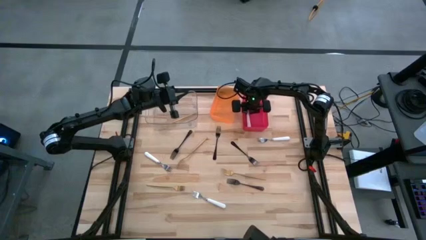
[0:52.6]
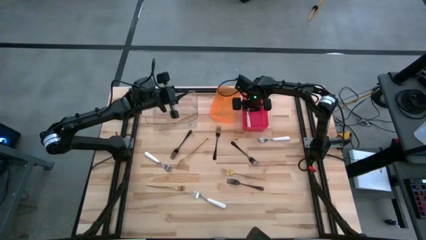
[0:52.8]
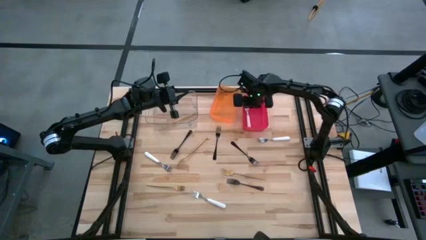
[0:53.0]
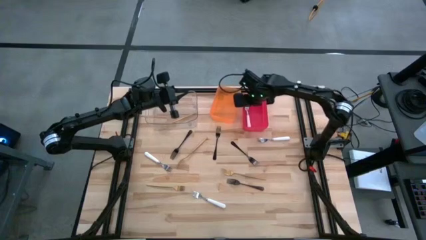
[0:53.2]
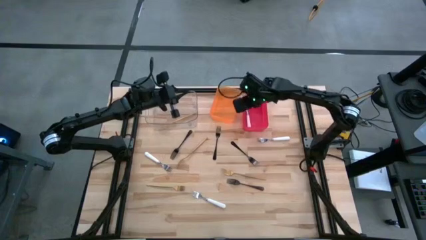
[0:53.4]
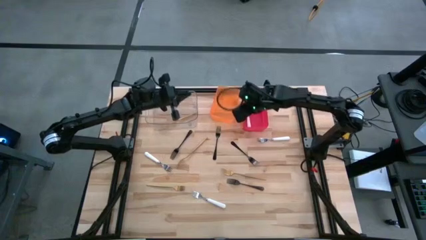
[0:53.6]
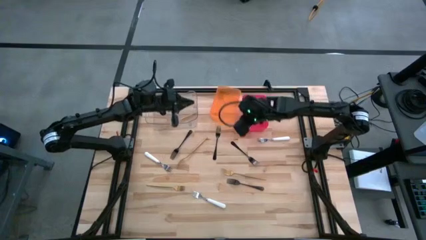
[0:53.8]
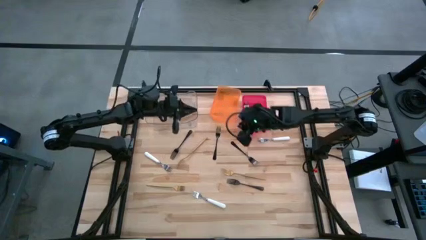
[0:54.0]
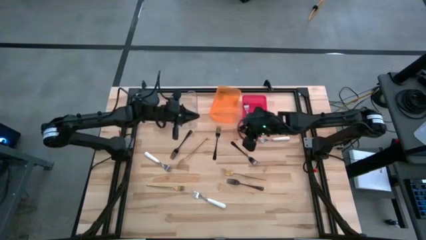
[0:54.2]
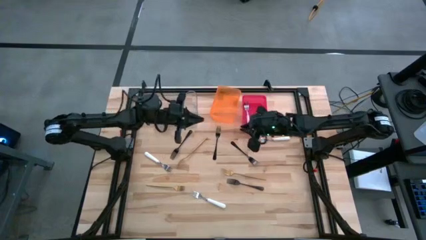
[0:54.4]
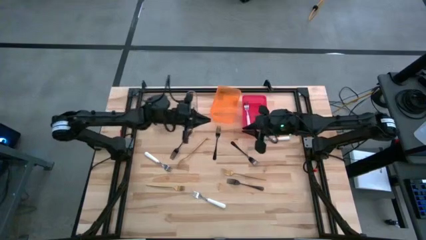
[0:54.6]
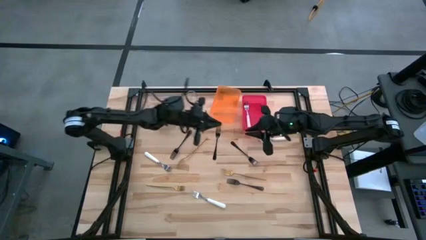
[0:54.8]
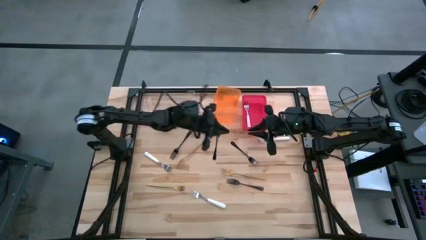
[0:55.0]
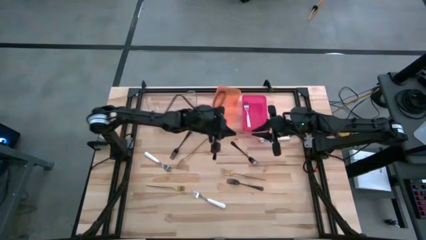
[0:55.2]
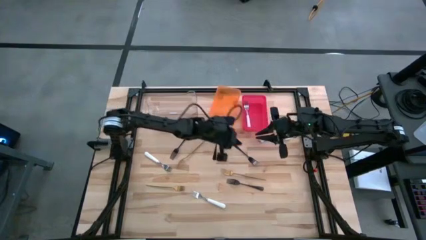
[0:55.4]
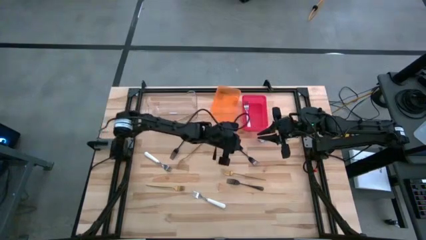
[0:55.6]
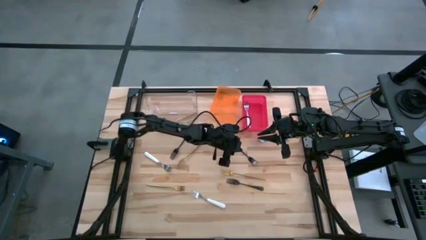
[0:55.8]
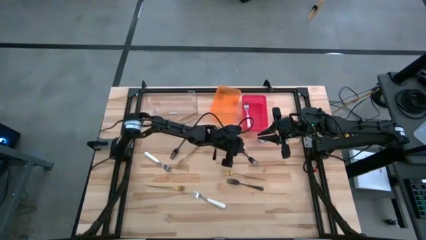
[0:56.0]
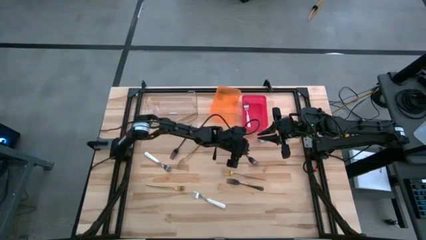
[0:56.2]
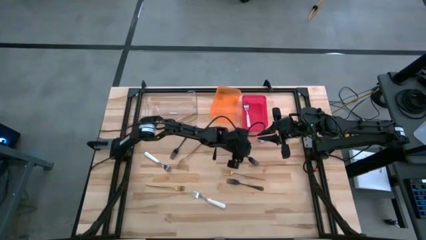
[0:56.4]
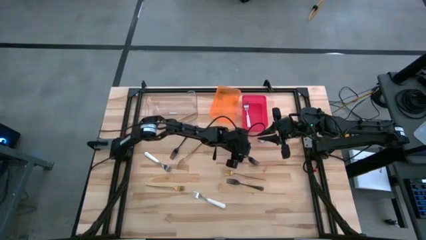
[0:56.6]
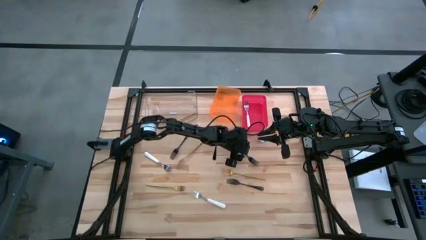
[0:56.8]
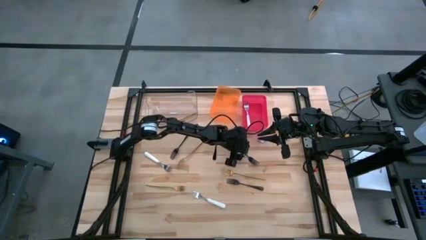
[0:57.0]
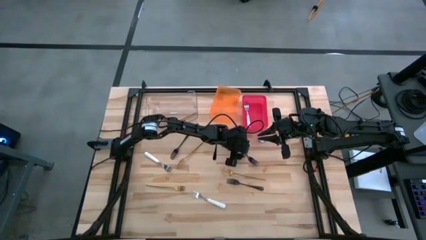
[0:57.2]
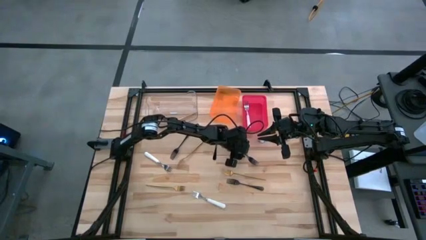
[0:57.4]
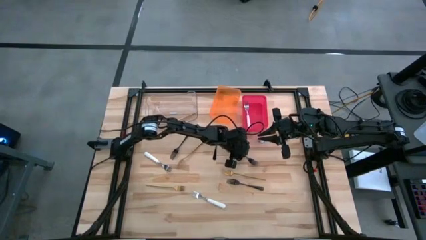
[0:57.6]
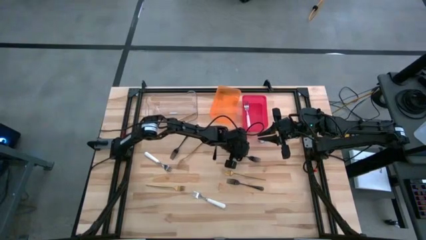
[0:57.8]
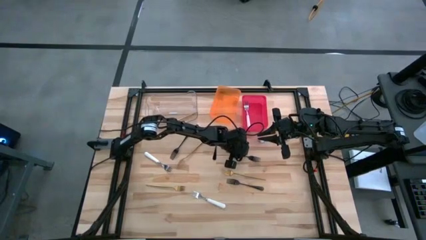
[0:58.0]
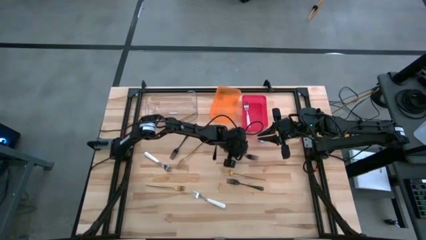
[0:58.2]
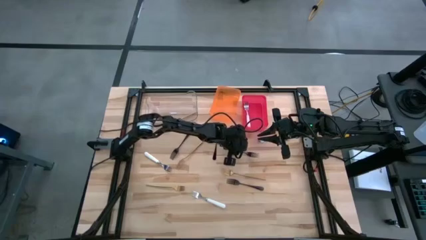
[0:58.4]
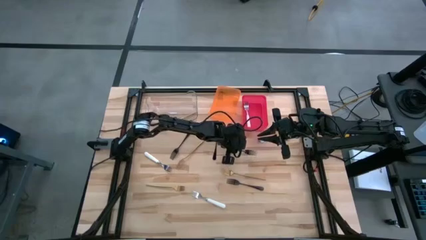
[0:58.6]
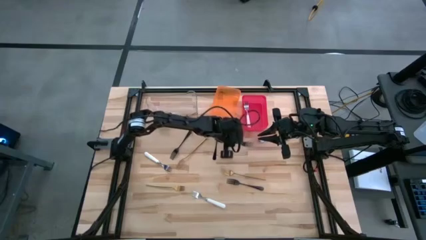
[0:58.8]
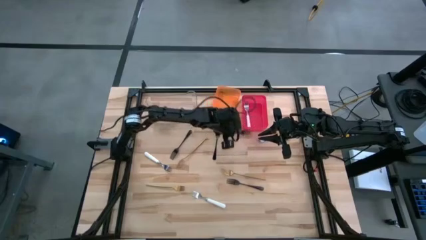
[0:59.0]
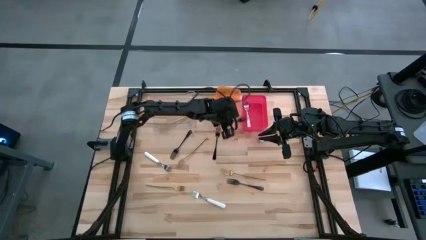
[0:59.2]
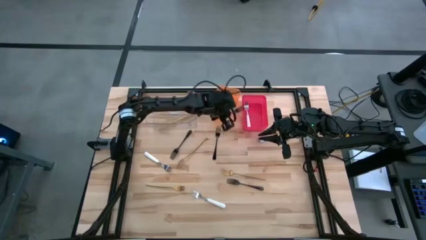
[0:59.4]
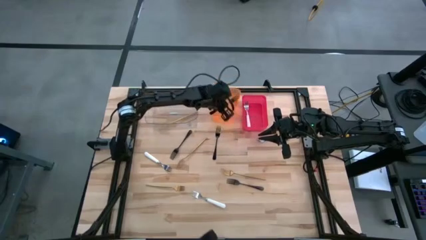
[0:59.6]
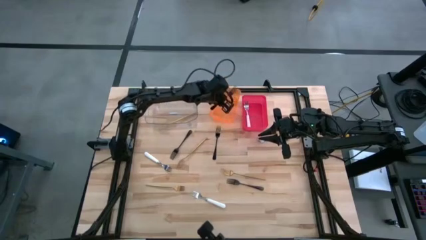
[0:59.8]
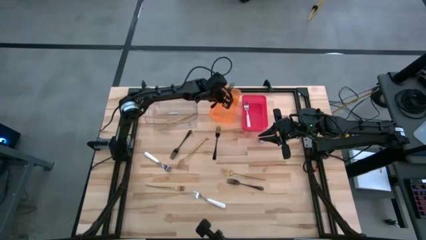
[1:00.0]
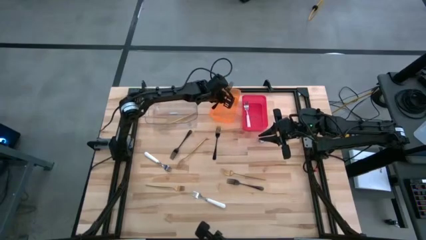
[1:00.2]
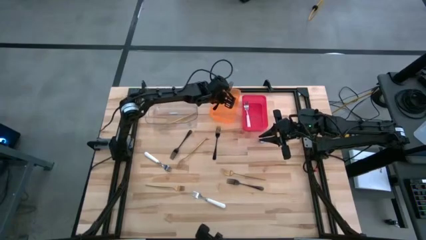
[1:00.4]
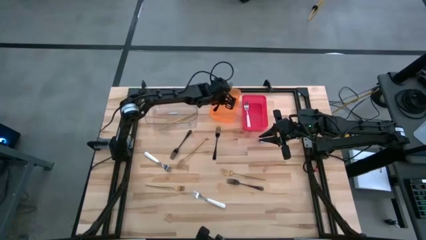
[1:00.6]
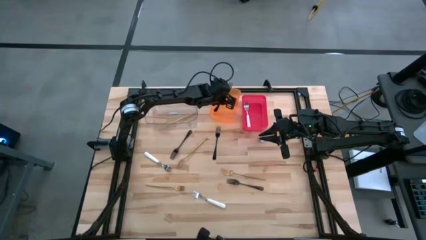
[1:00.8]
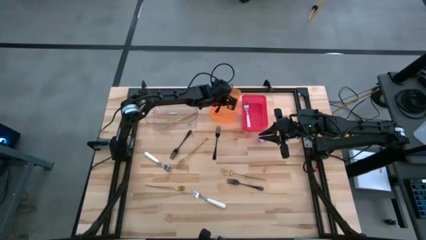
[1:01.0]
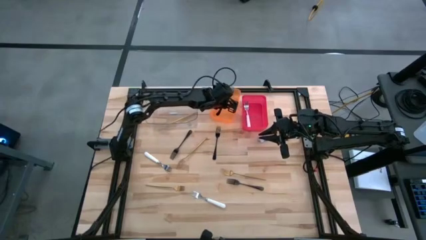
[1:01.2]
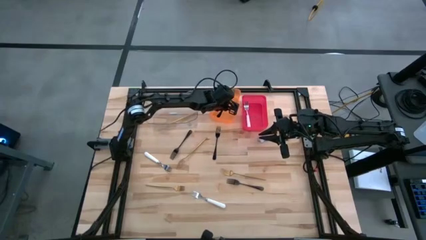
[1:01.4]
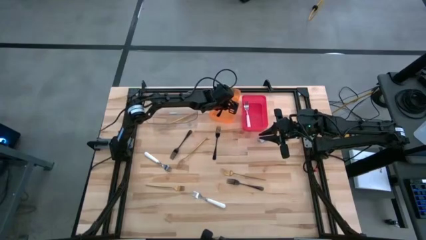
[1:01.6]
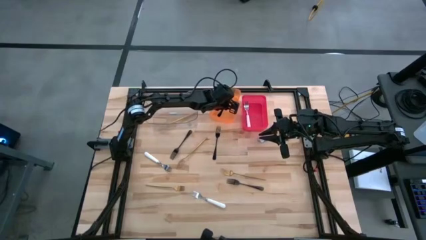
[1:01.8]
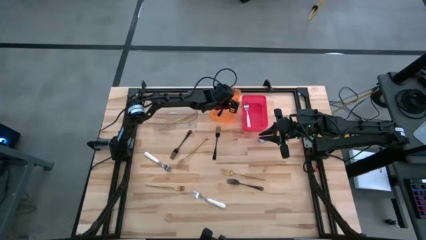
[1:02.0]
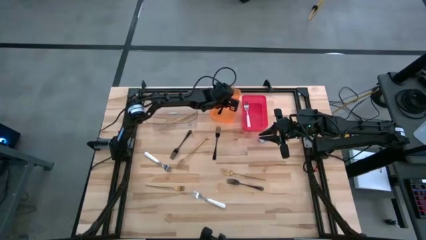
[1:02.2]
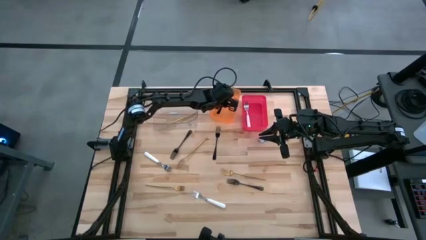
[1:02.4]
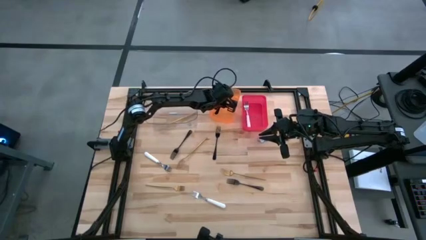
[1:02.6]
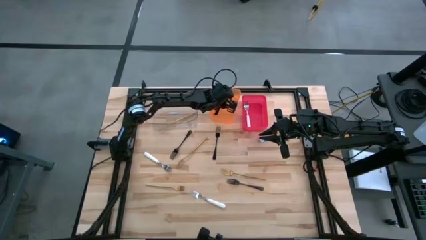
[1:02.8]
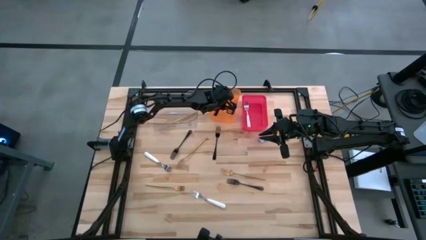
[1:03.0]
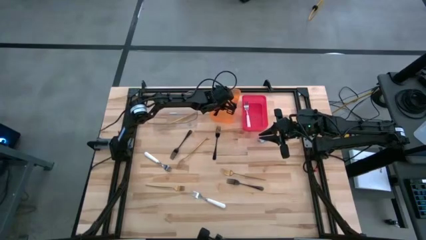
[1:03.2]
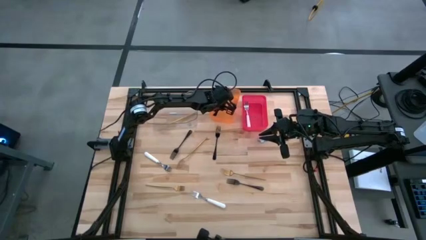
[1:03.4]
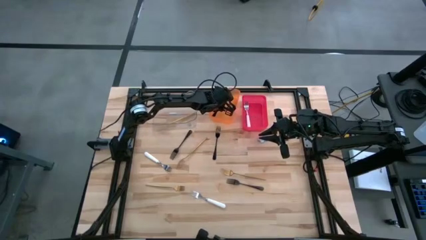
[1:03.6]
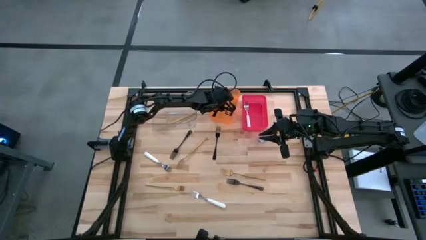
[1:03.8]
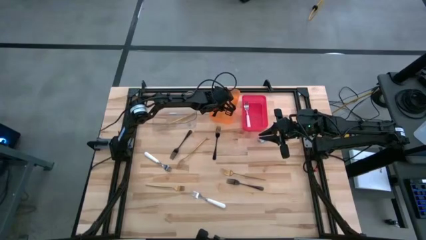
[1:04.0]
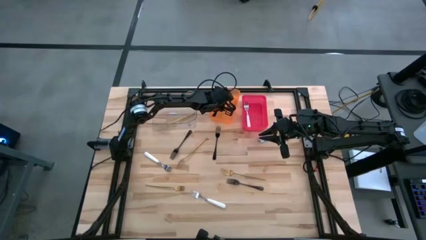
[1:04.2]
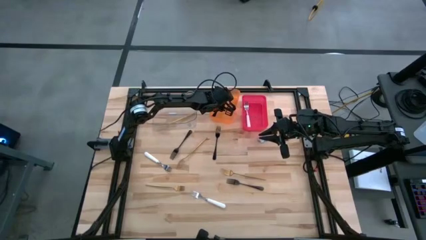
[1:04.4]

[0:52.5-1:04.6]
Task: Sort silverware by color (type)
Put the black fork into the orange bin
